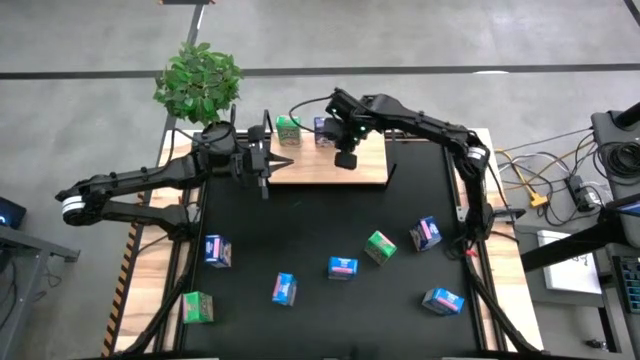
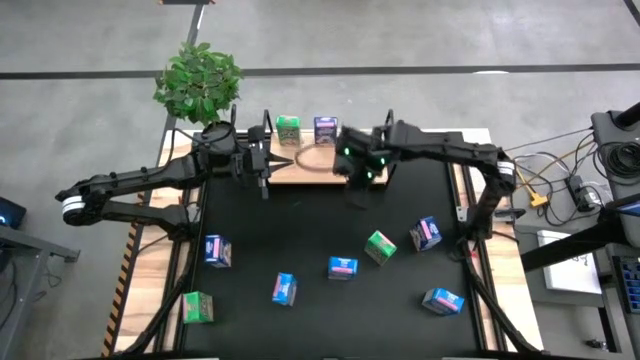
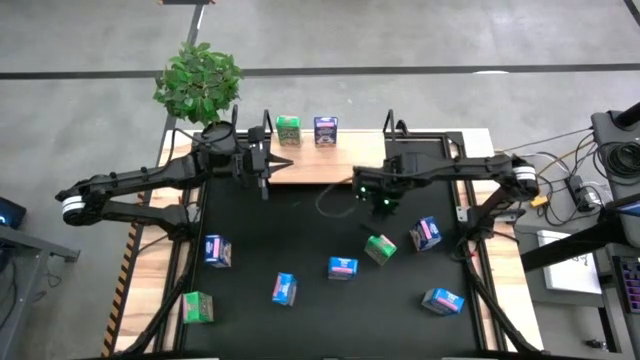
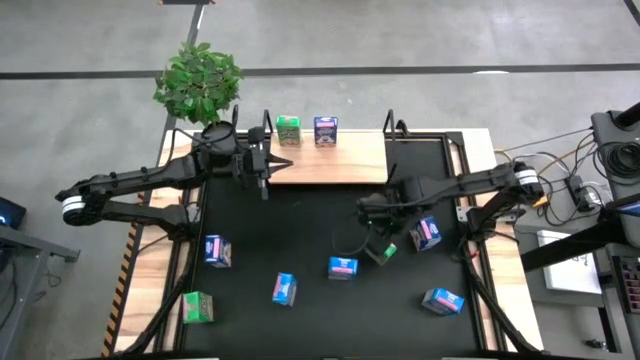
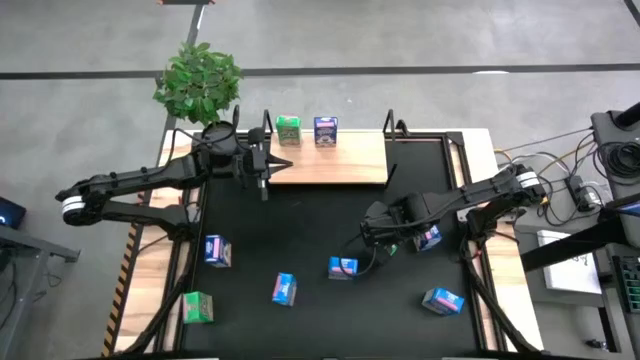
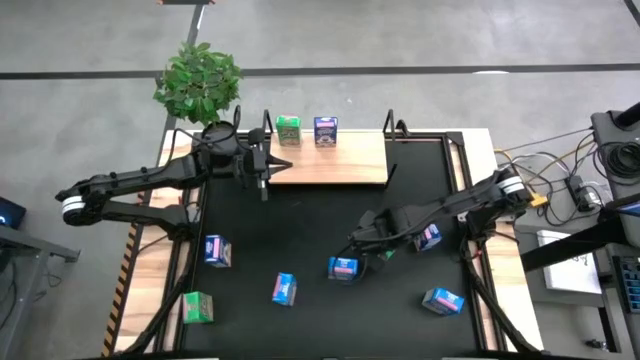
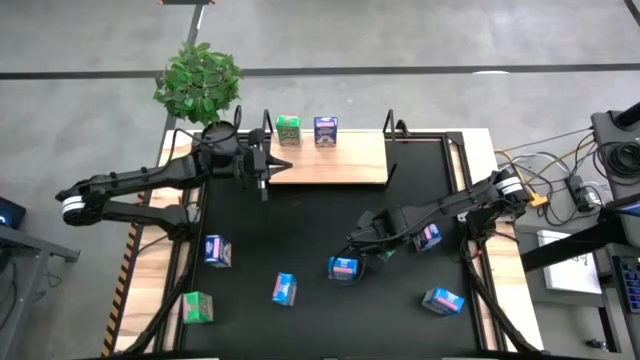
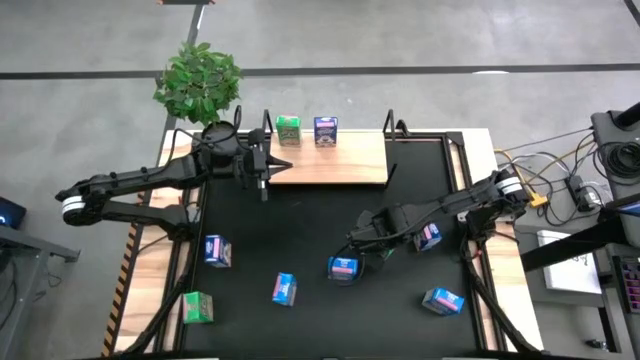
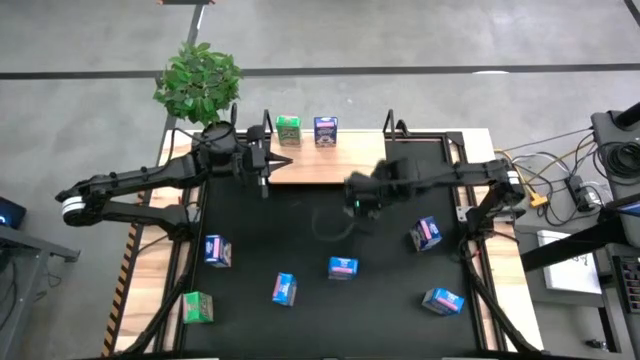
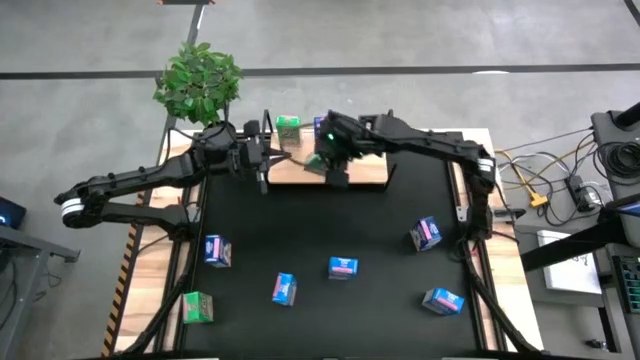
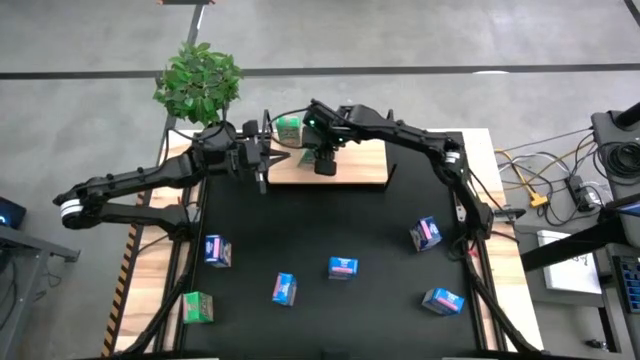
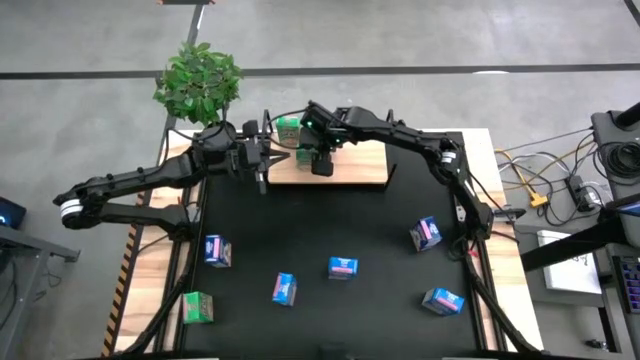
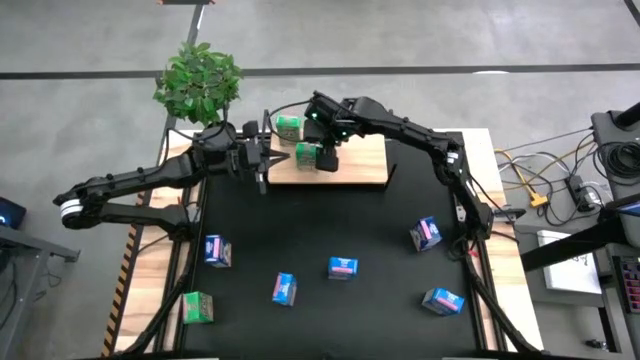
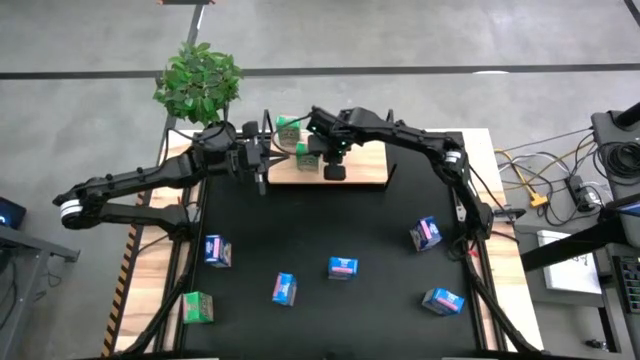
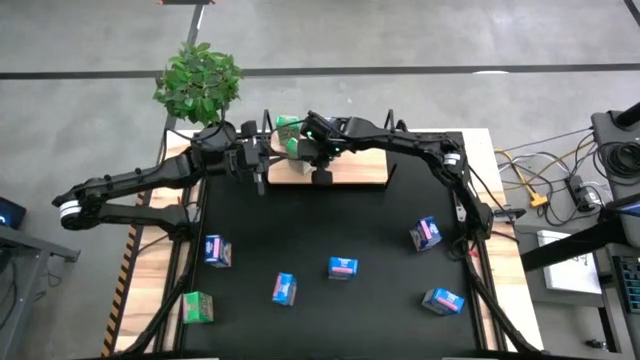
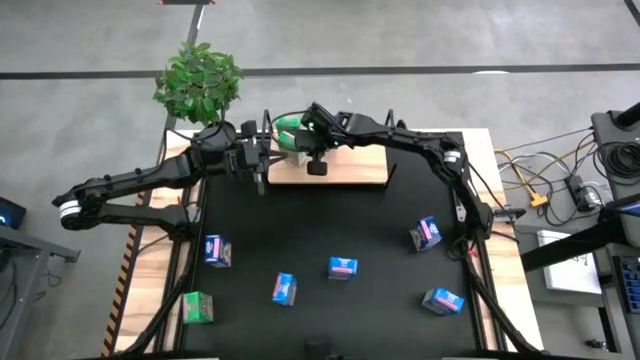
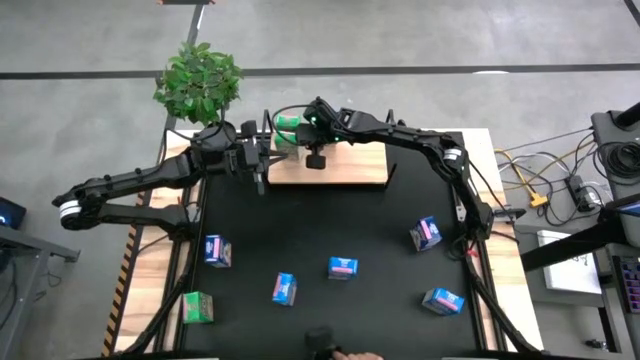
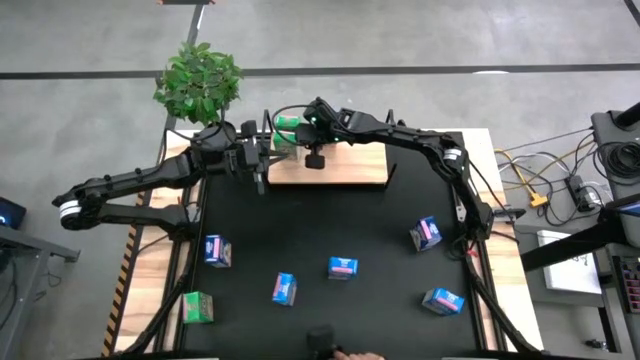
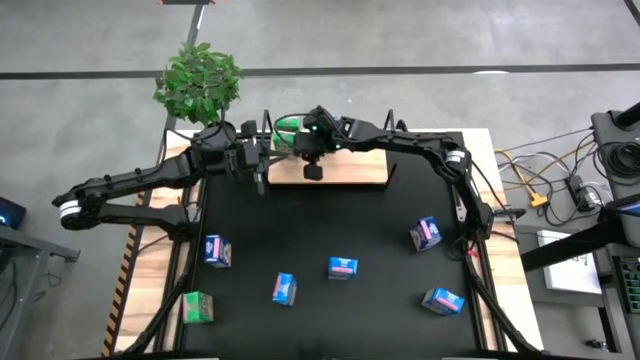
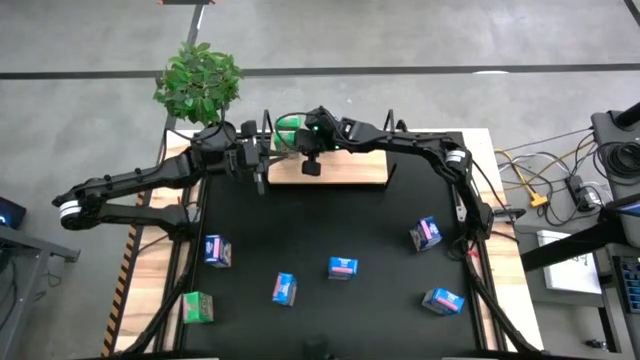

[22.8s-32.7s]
Task: Stack cereal on shelf
Put the top green cereal box aligned with the other green cereal box on the shelf

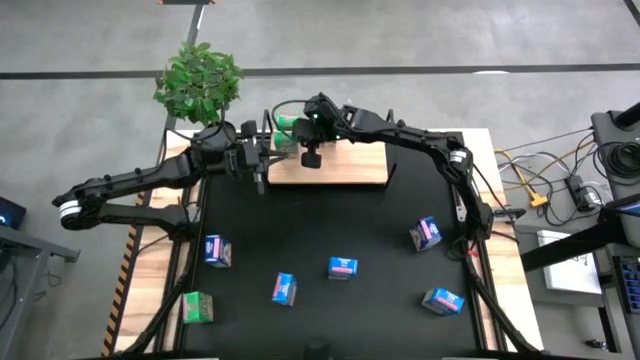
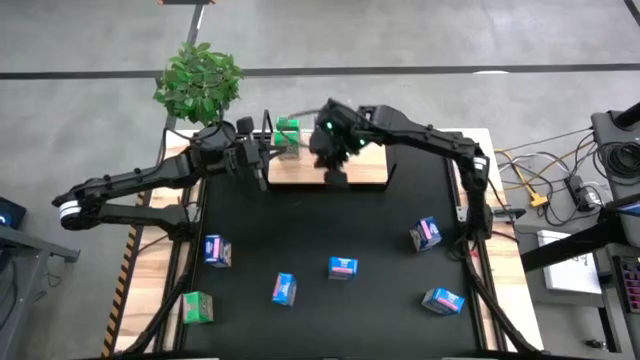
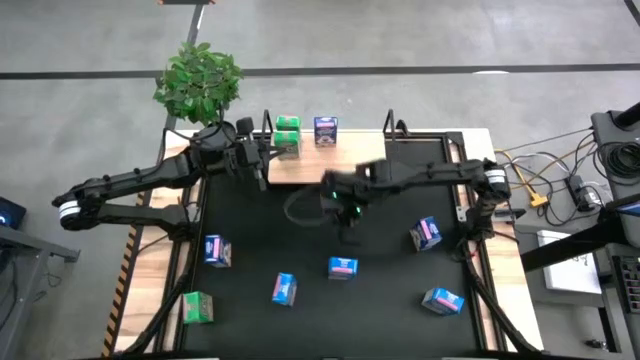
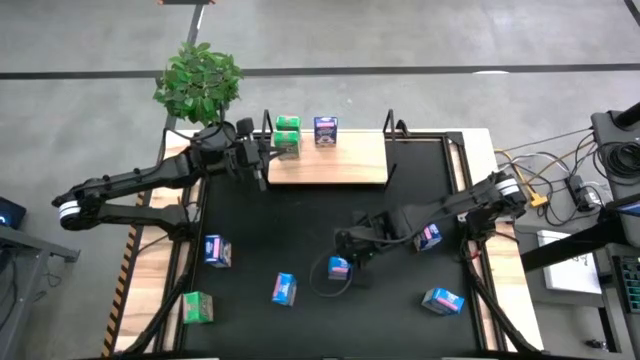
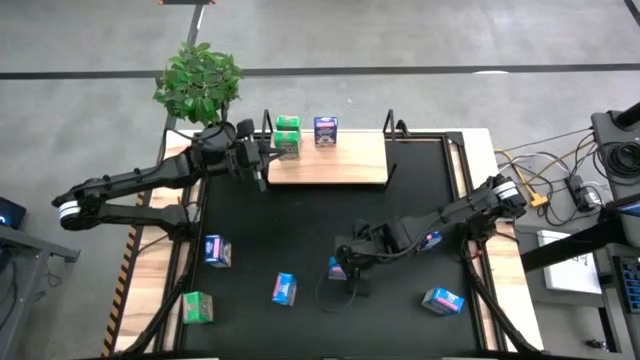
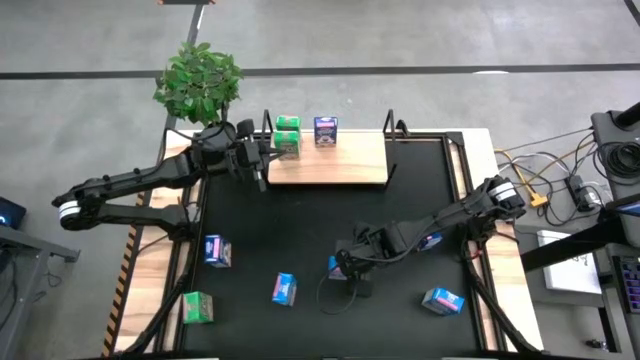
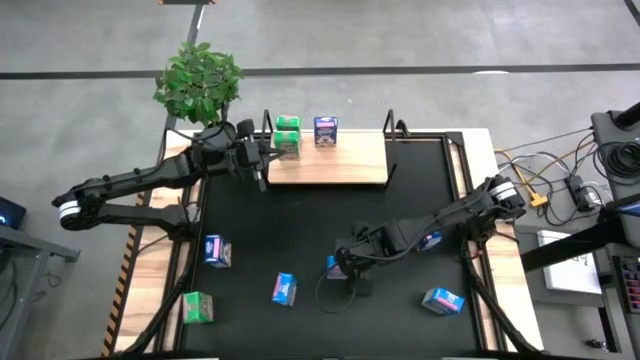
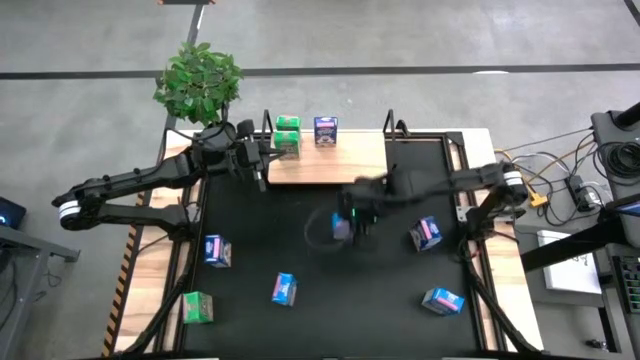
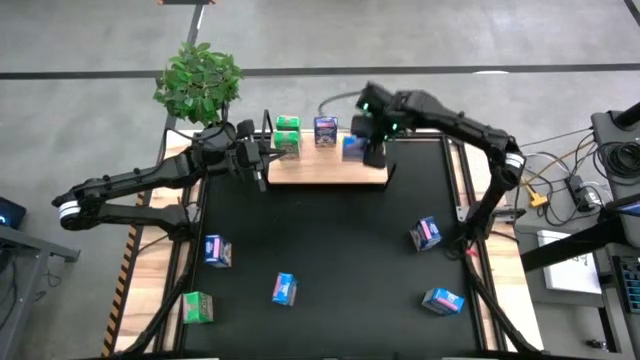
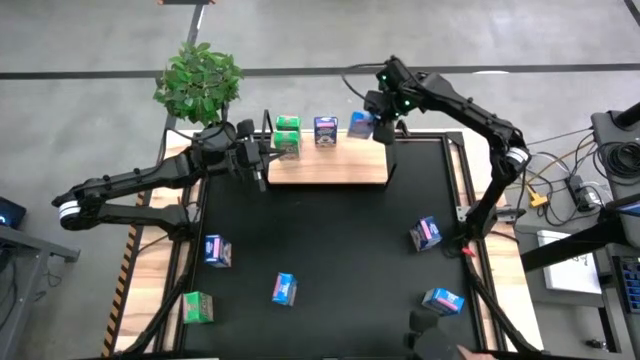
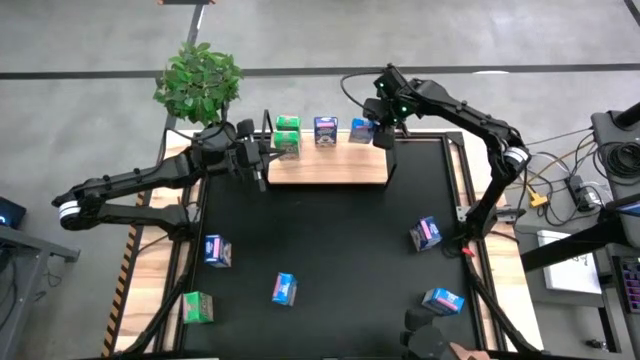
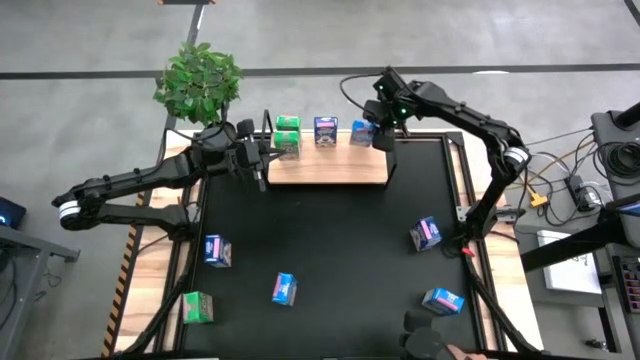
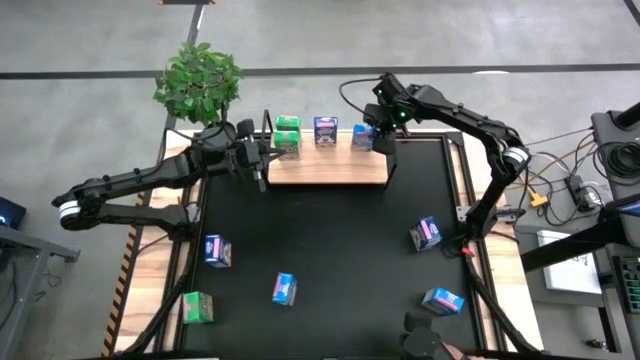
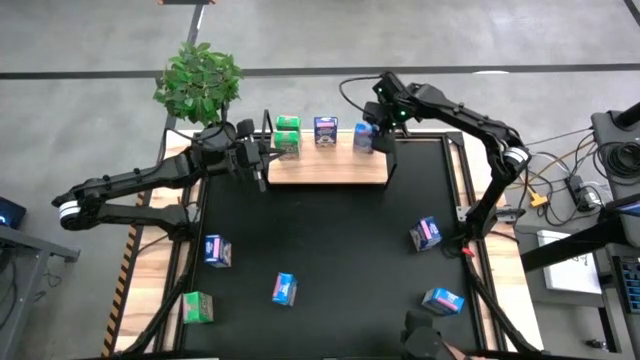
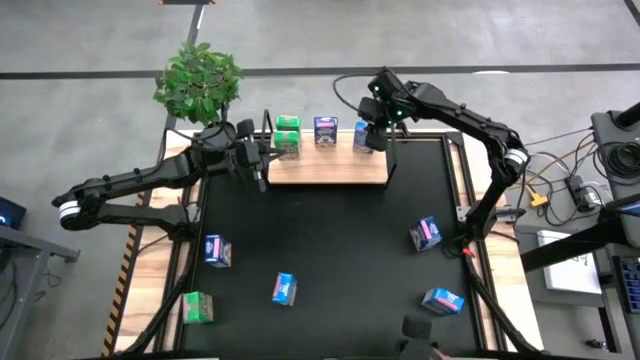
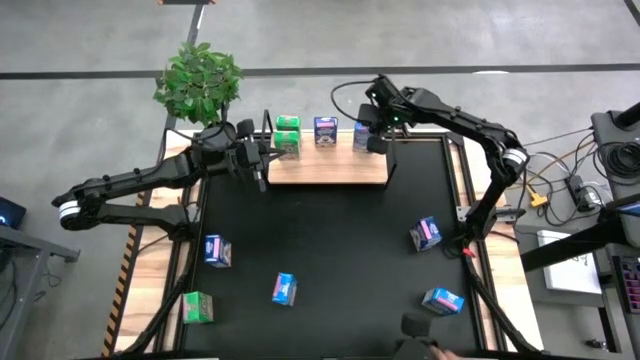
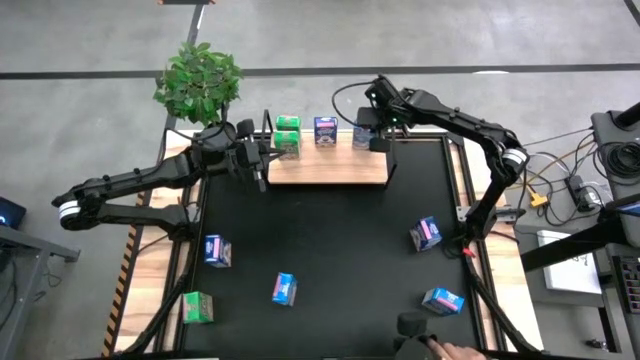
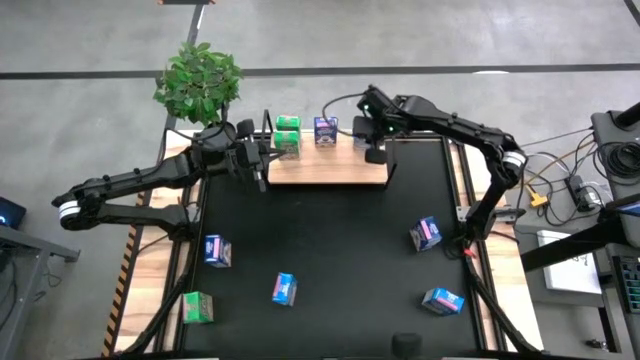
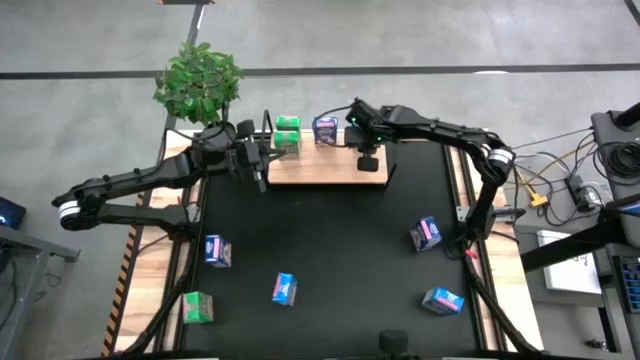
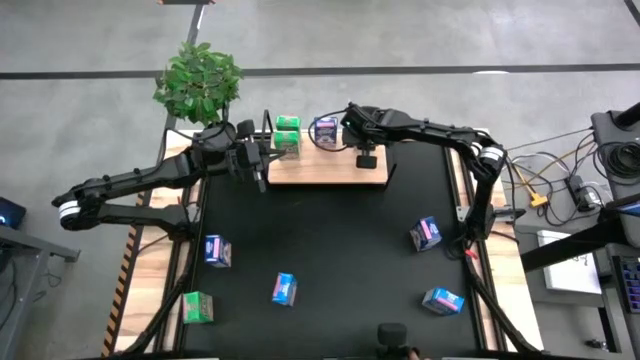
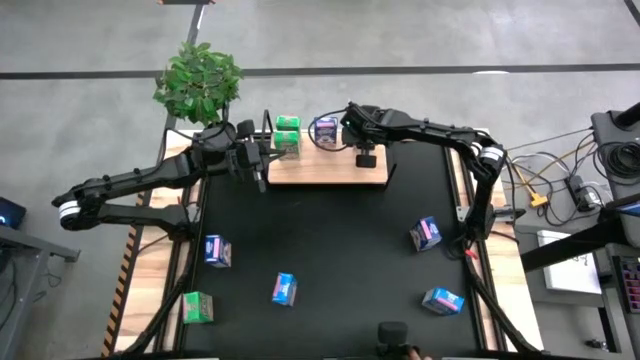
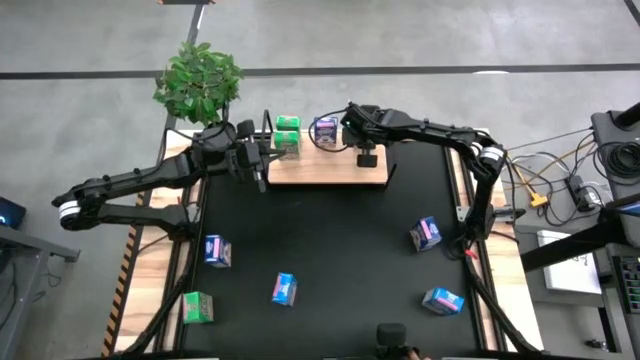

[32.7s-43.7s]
Put the top light blue cereal box on the shelf
